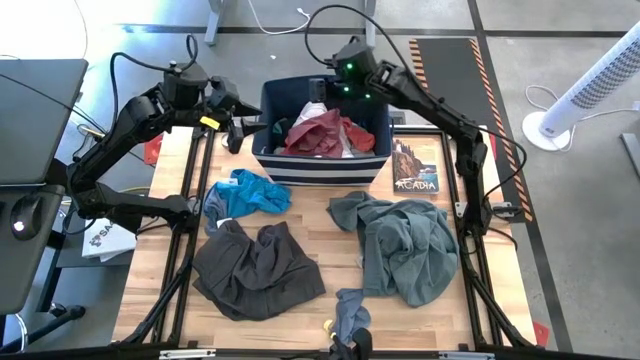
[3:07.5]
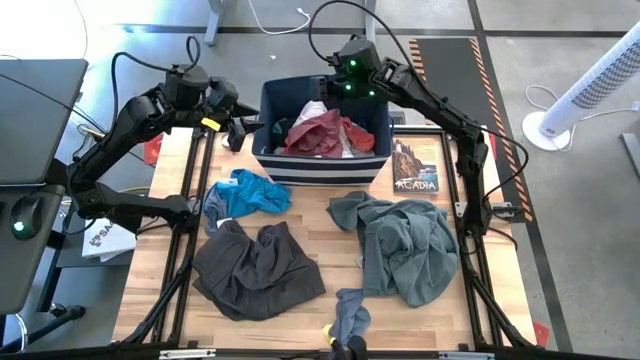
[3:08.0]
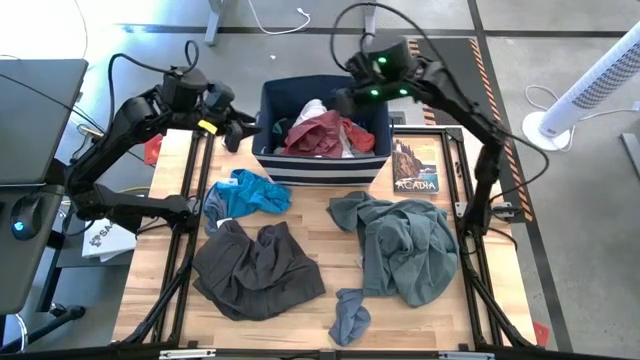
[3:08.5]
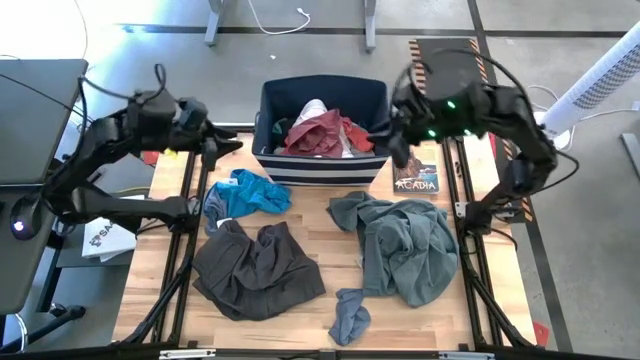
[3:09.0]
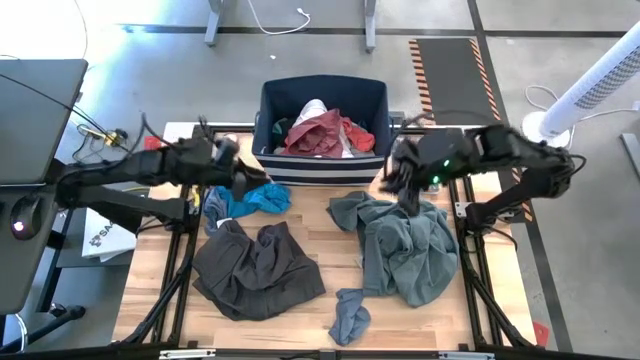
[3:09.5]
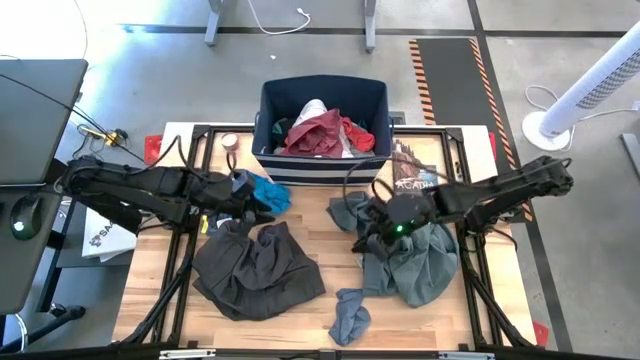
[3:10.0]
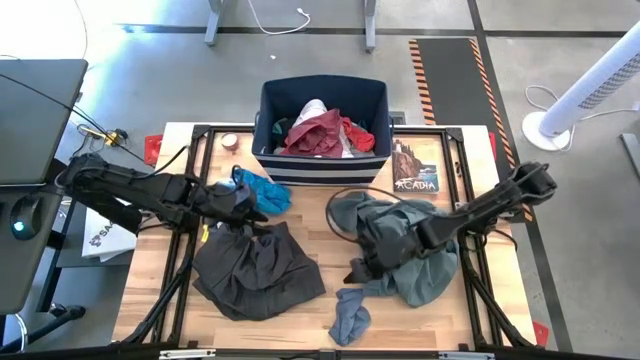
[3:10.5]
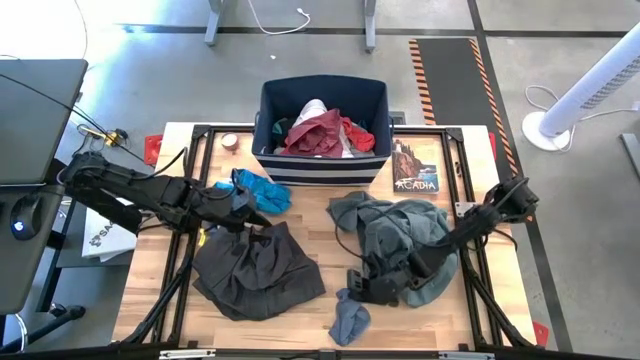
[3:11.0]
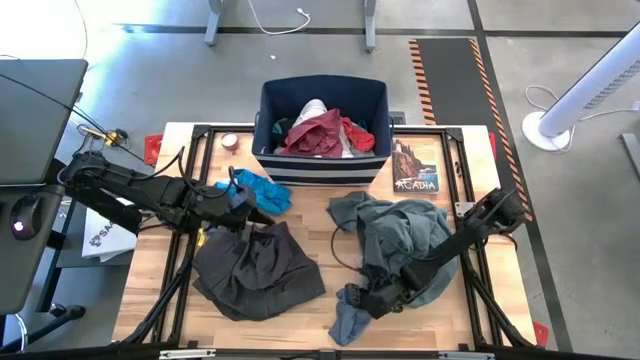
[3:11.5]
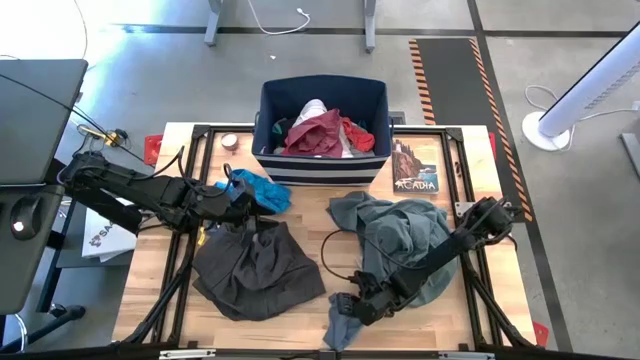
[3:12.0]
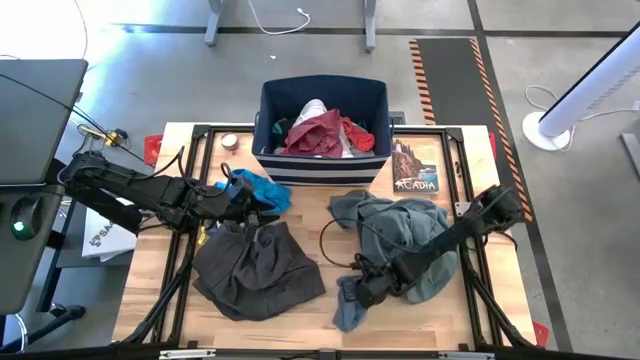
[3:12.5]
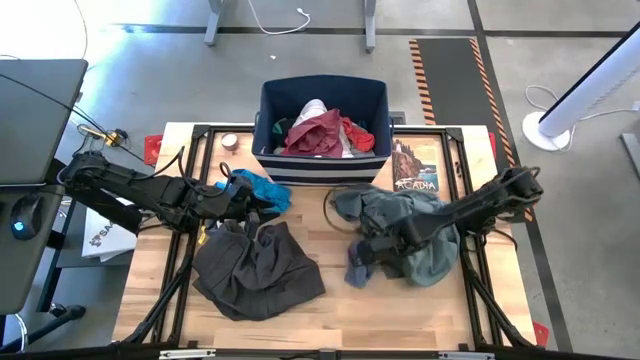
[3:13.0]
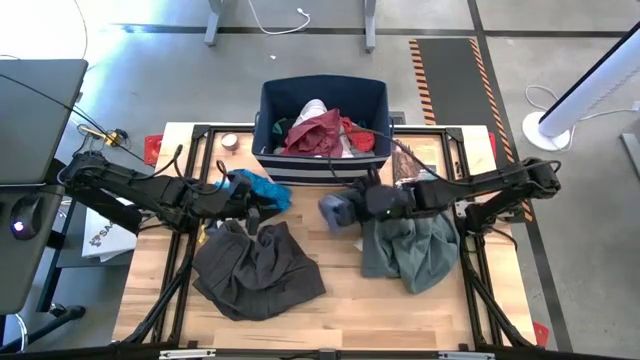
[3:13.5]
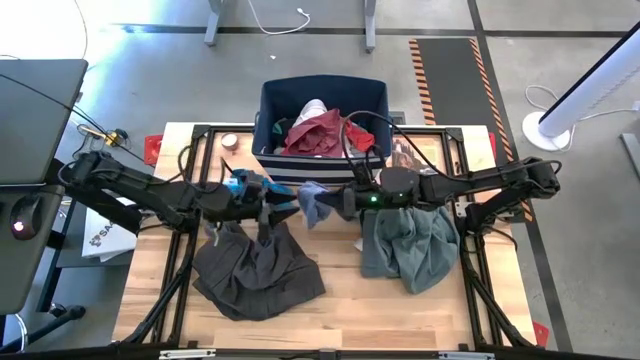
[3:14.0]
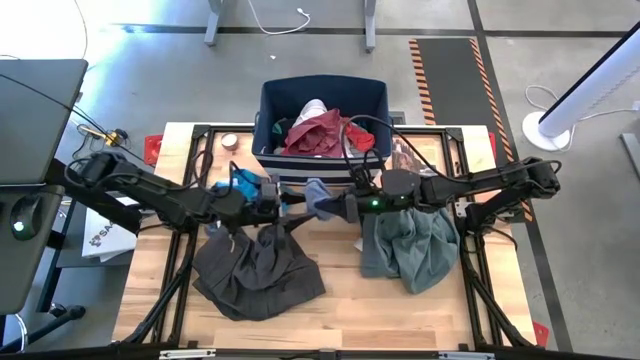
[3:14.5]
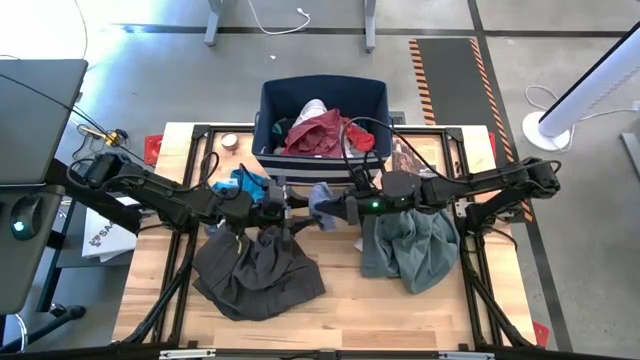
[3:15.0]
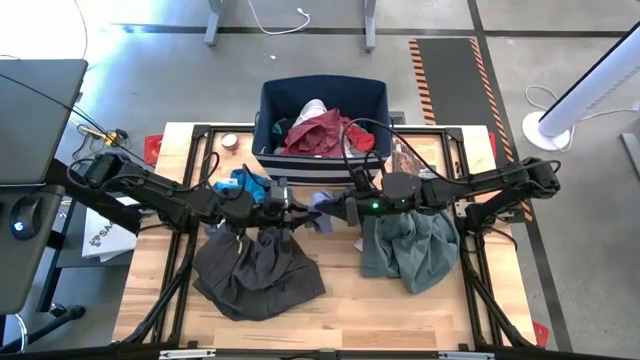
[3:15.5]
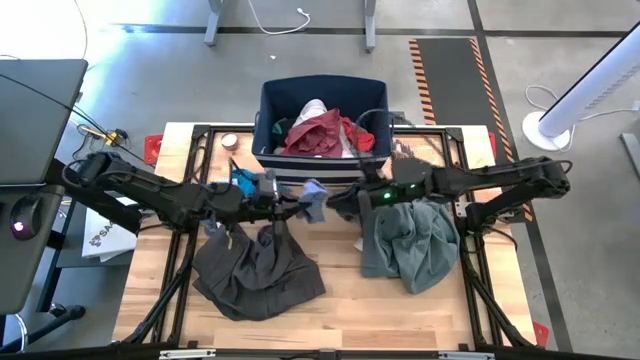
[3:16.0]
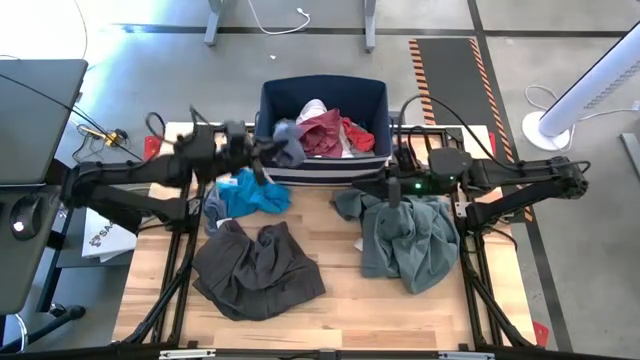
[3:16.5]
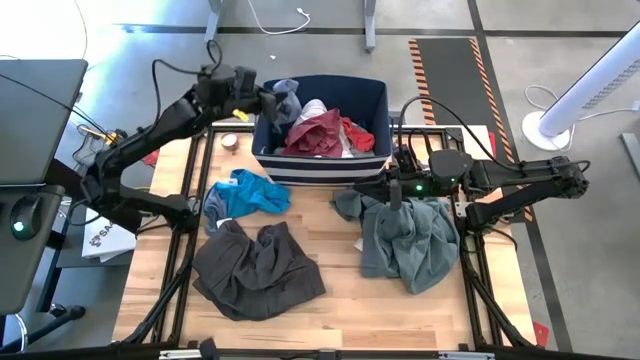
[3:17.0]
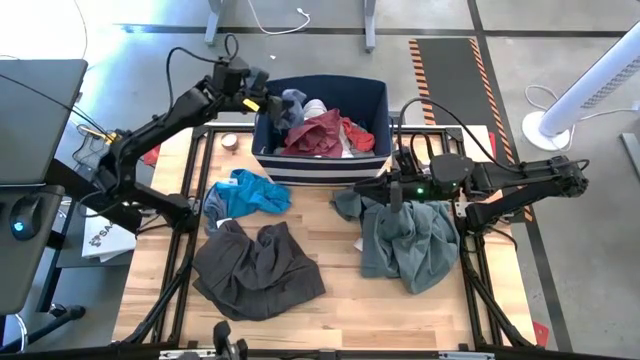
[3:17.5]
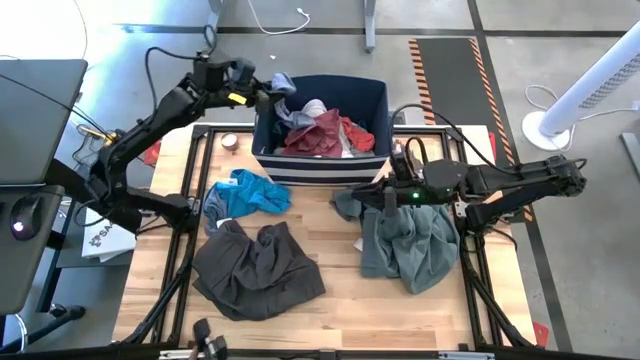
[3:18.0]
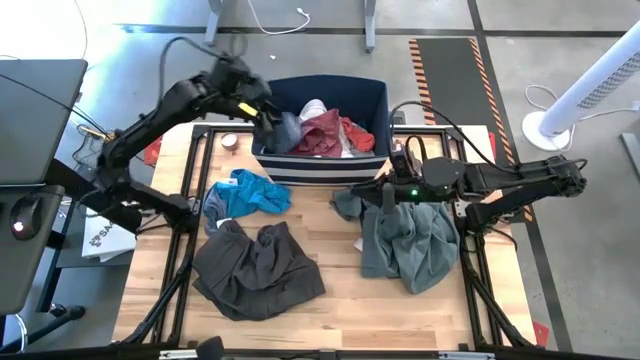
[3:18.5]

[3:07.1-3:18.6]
Task: Sort clothes
Put the light blue towel into the blue laundry bin

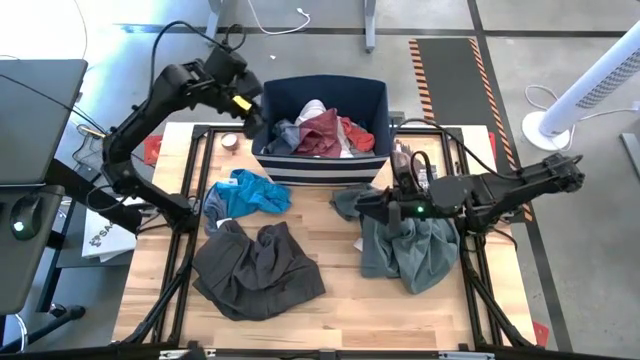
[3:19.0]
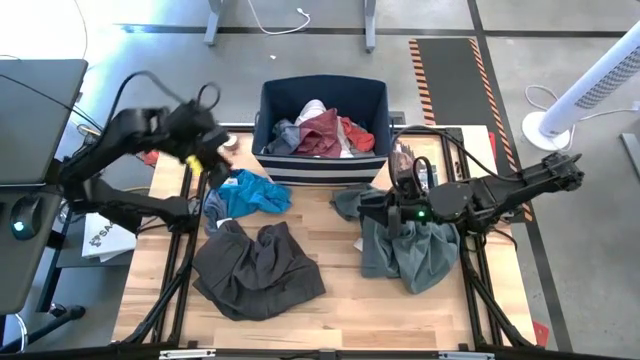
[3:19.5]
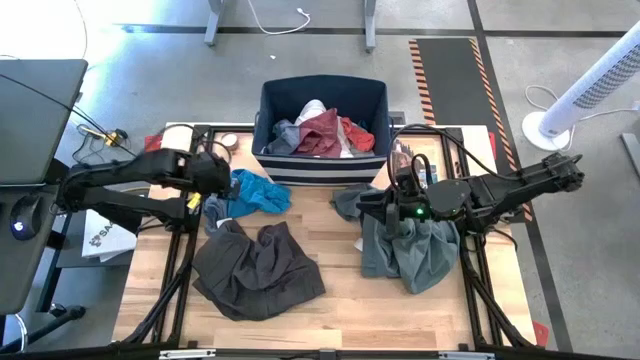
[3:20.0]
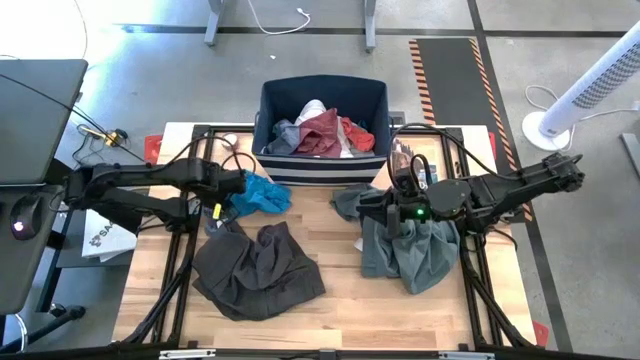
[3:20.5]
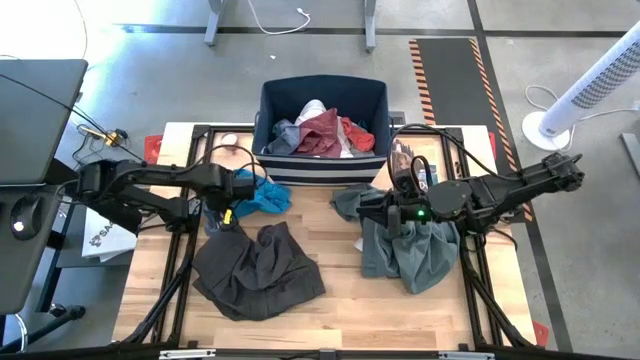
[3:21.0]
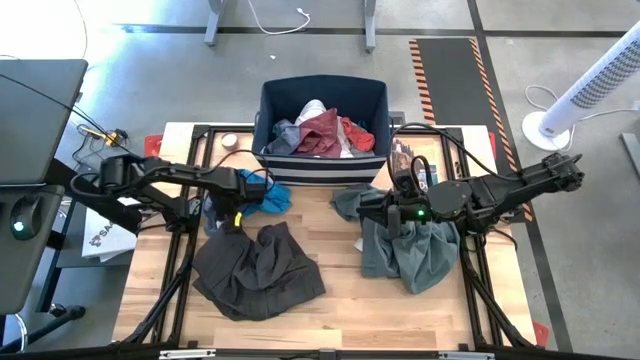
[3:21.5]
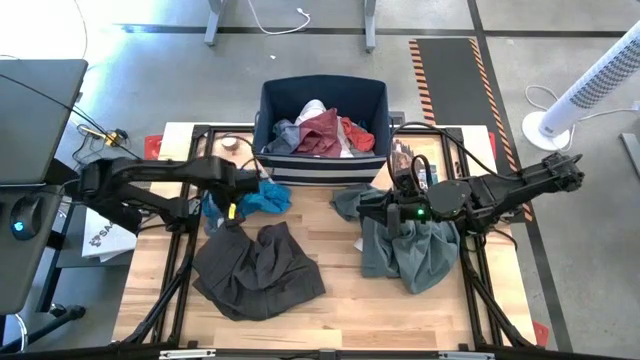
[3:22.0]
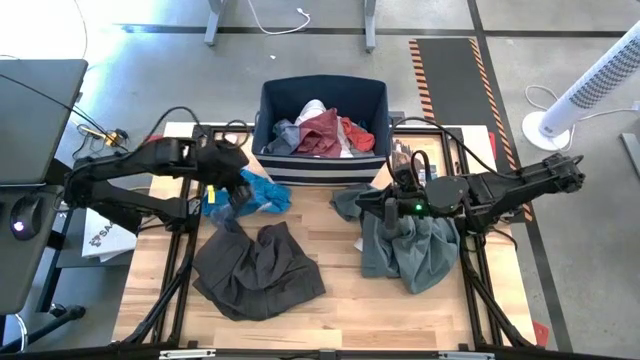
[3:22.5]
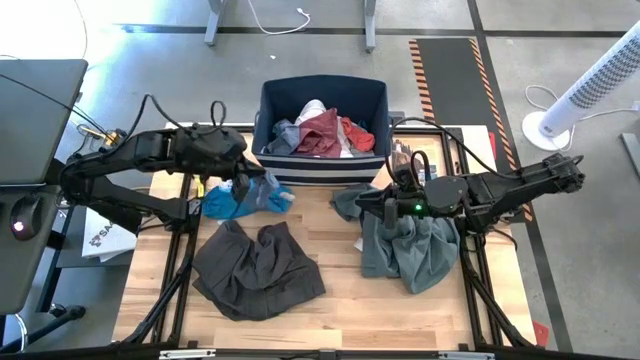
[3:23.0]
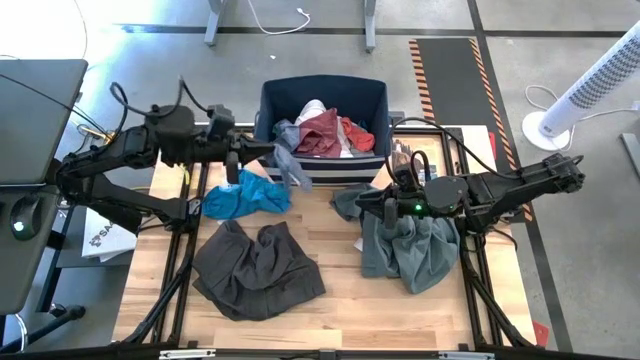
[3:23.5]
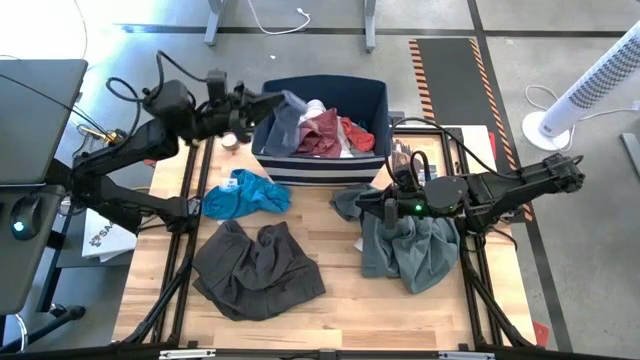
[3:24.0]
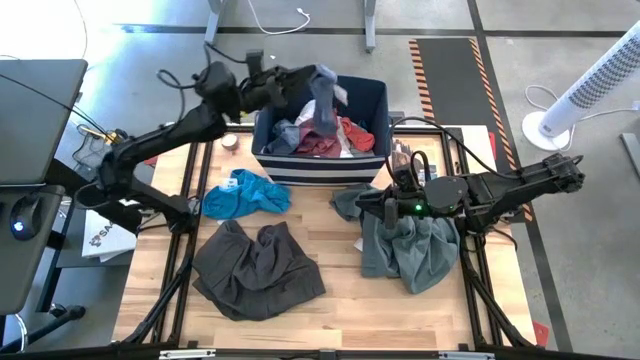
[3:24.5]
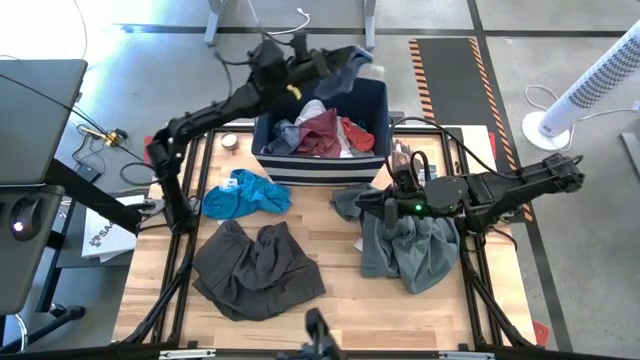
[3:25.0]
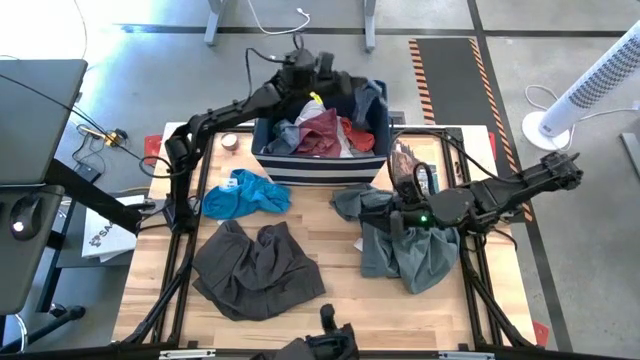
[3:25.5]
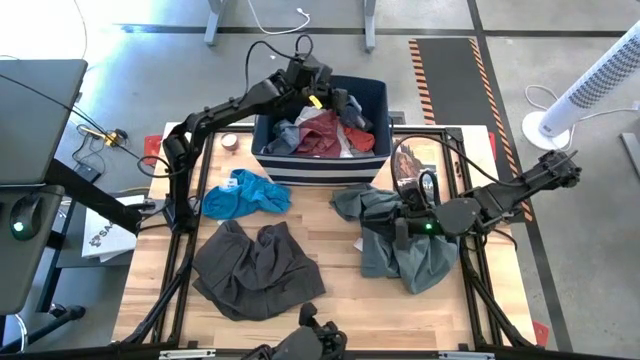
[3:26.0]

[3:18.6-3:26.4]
Put the light blue towel into the blue laundry bin

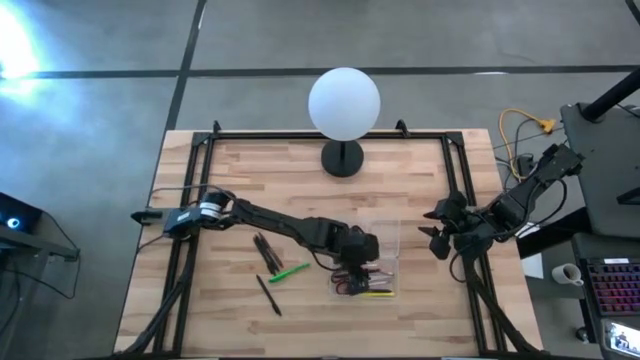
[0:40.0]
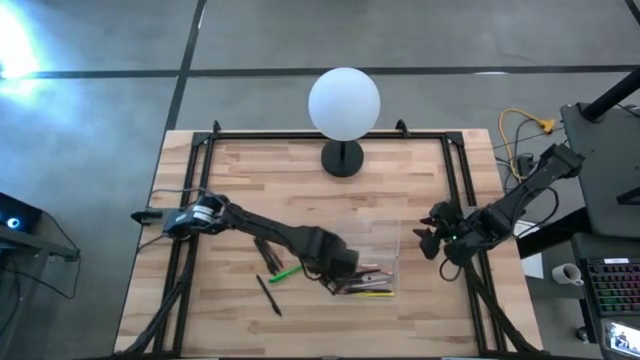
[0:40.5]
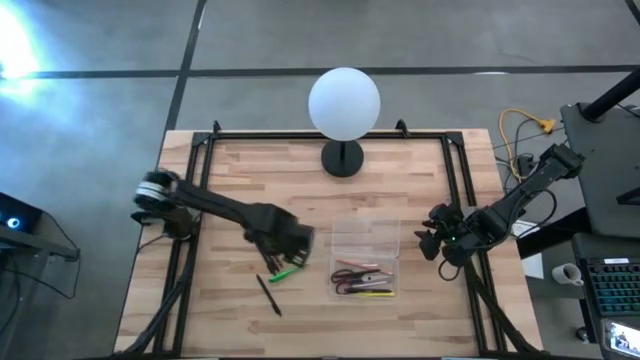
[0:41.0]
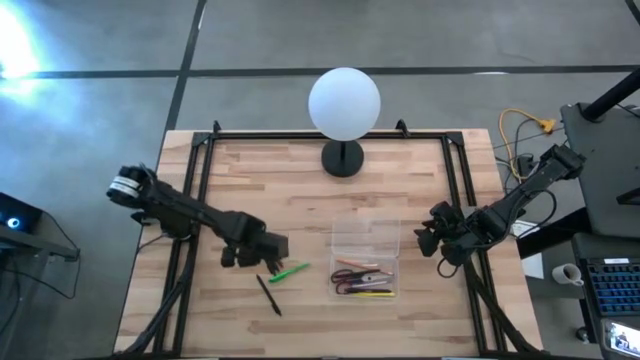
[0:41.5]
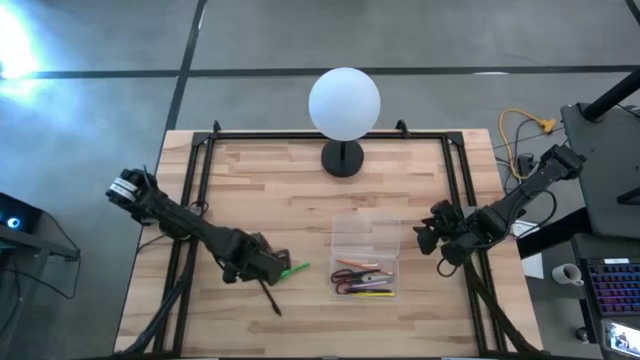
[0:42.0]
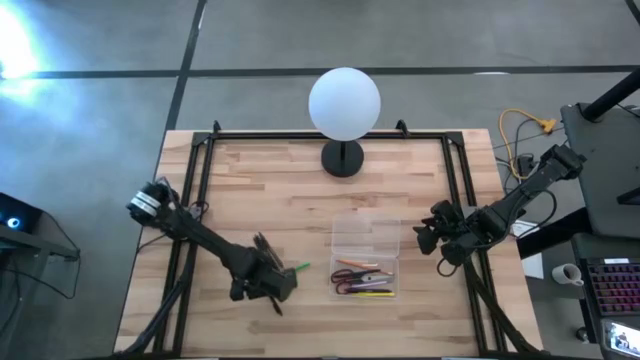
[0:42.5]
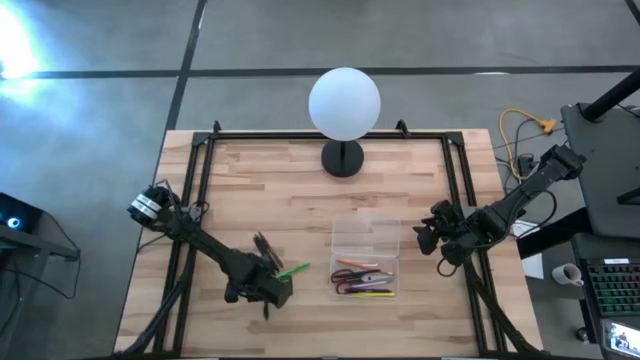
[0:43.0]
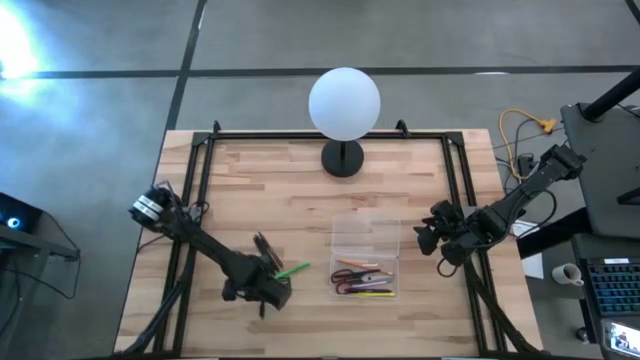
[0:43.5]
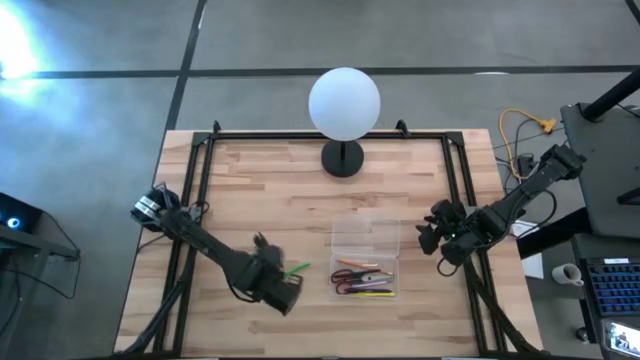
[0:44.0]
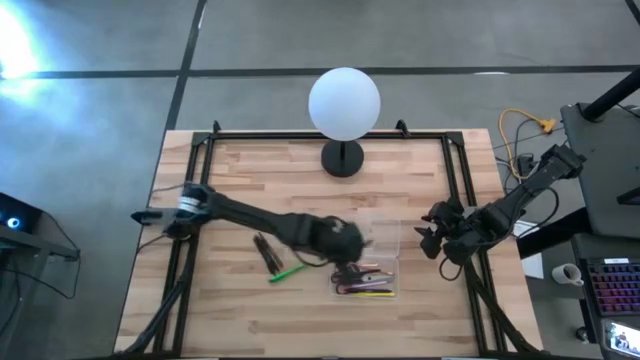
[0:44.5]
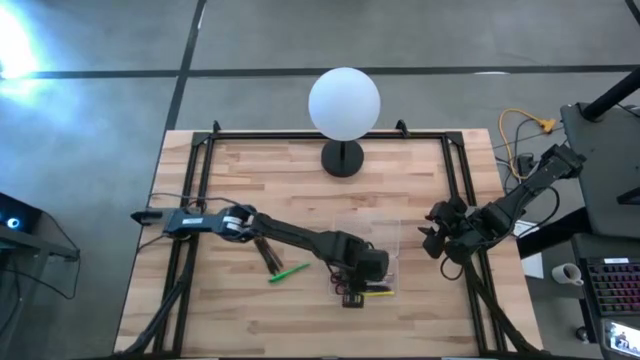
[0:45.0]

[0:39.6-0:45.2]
Task: Pick & place school supplies into a supply box
Put the black pen into the transparent supply box
